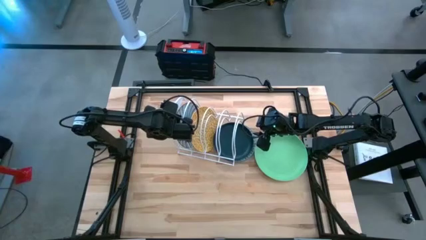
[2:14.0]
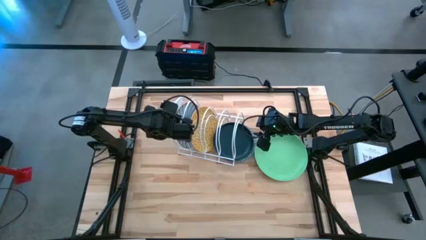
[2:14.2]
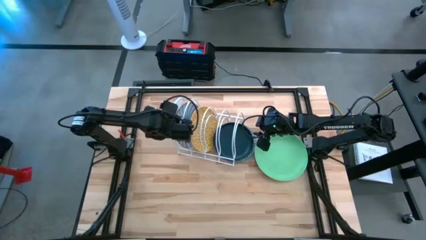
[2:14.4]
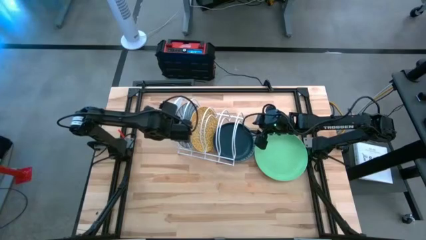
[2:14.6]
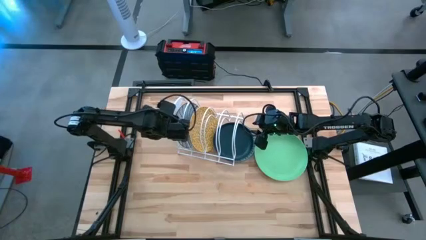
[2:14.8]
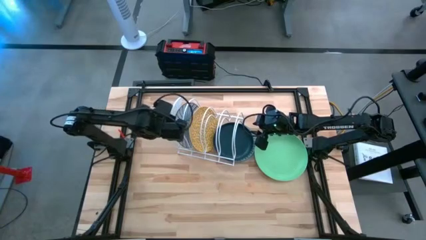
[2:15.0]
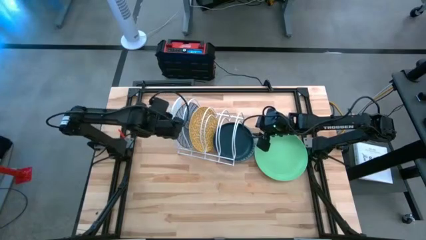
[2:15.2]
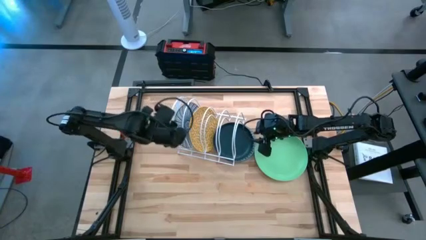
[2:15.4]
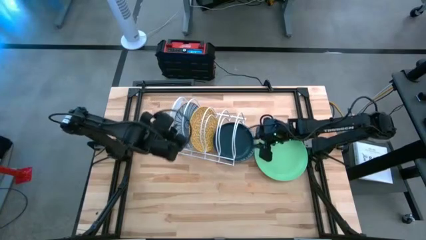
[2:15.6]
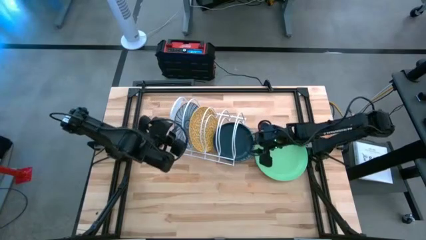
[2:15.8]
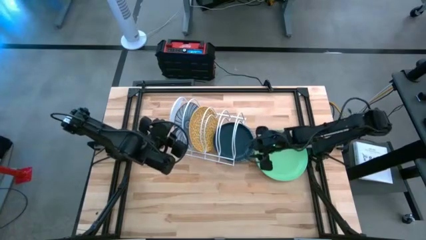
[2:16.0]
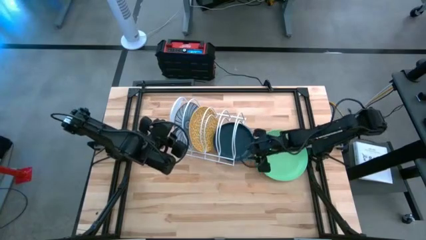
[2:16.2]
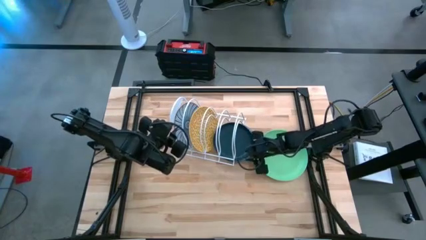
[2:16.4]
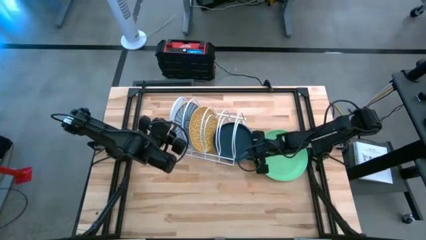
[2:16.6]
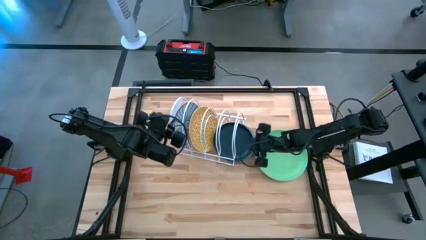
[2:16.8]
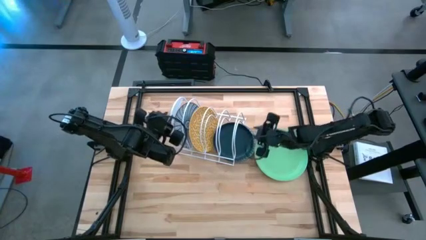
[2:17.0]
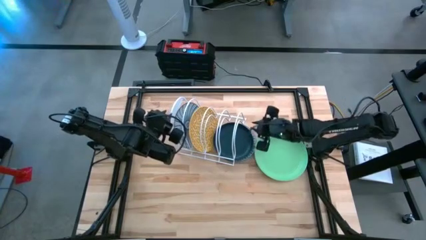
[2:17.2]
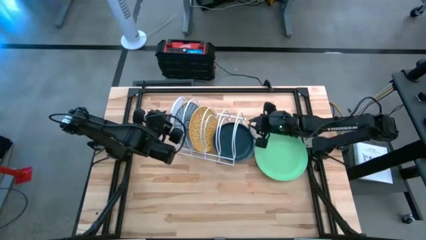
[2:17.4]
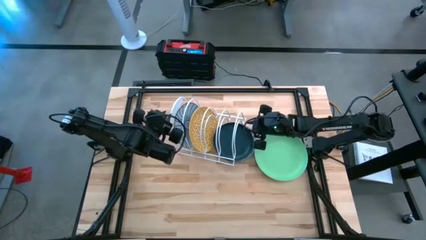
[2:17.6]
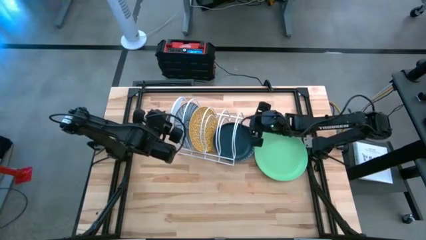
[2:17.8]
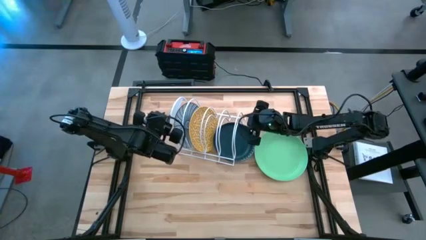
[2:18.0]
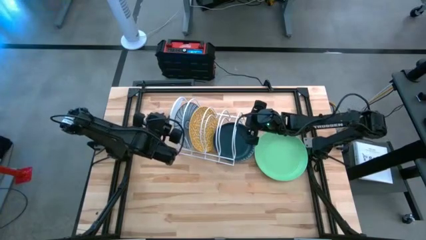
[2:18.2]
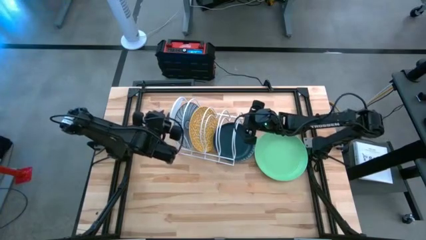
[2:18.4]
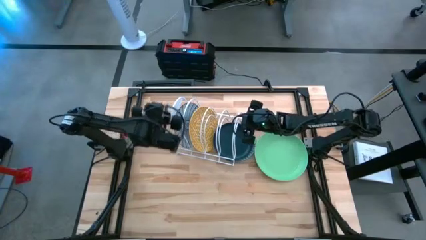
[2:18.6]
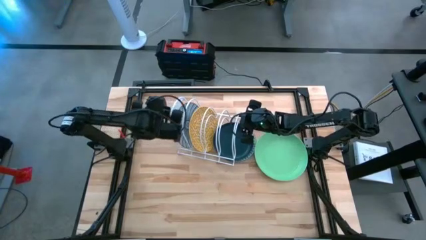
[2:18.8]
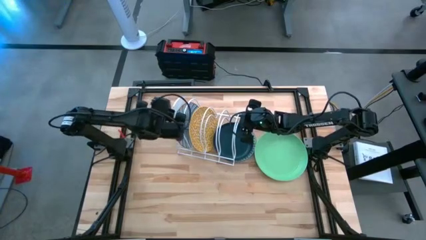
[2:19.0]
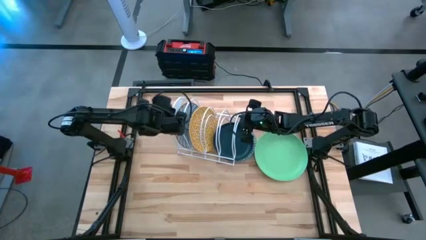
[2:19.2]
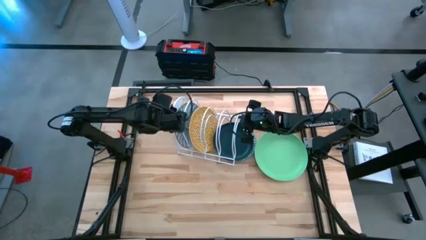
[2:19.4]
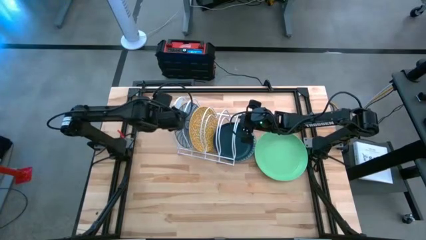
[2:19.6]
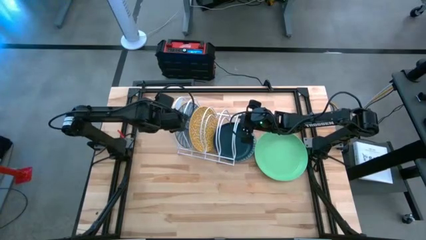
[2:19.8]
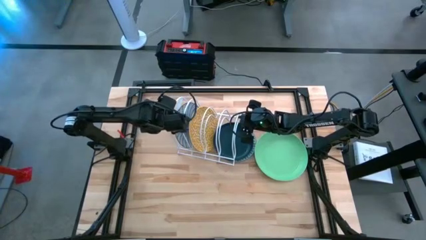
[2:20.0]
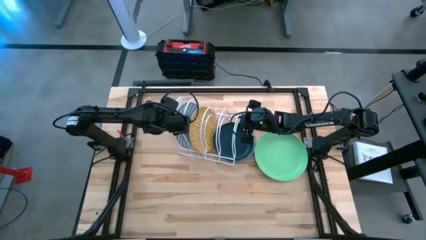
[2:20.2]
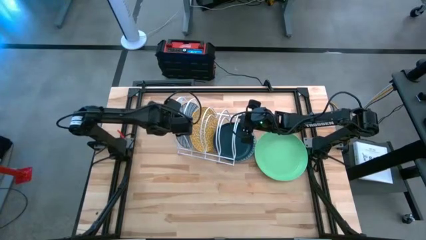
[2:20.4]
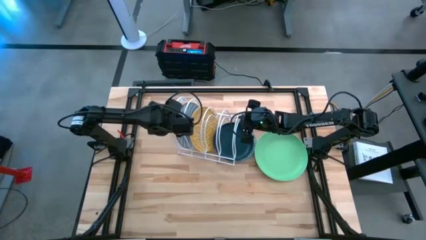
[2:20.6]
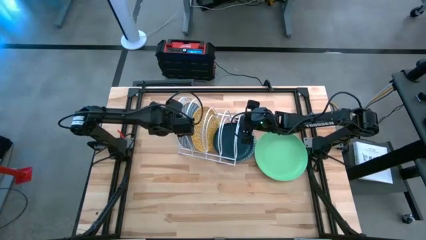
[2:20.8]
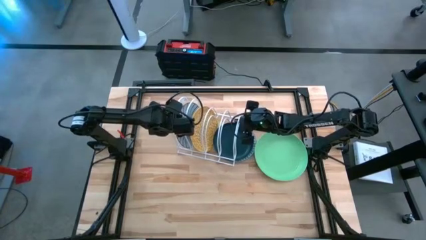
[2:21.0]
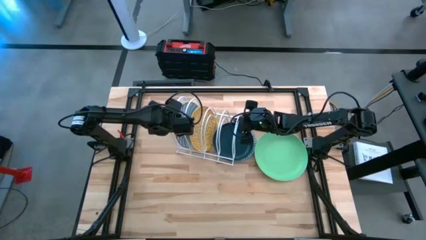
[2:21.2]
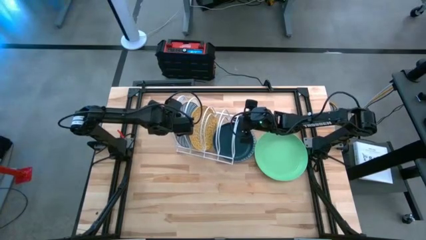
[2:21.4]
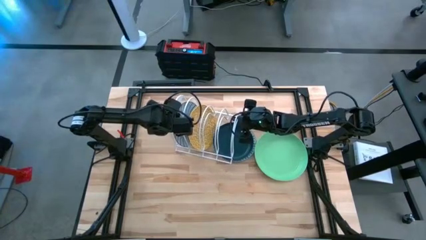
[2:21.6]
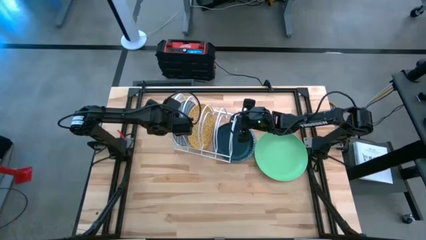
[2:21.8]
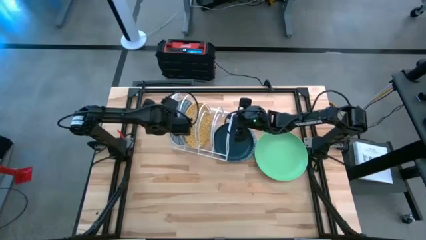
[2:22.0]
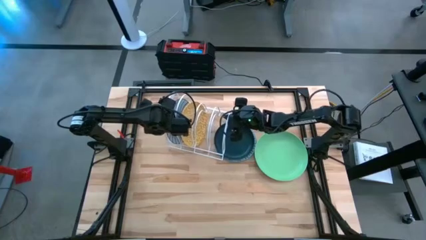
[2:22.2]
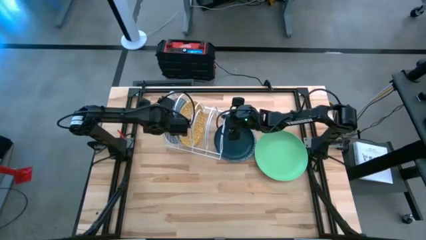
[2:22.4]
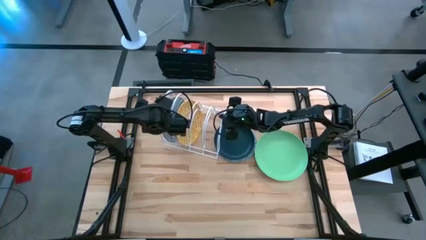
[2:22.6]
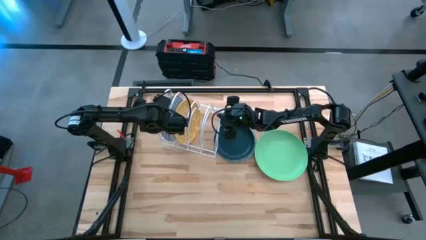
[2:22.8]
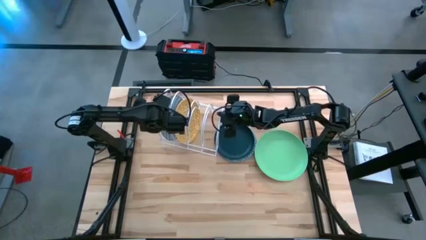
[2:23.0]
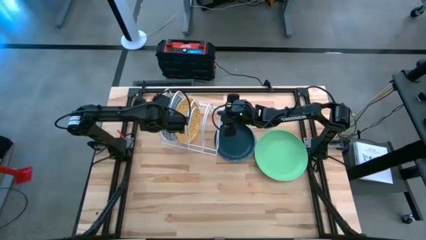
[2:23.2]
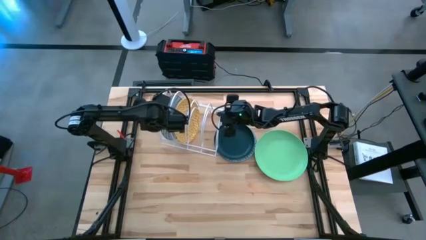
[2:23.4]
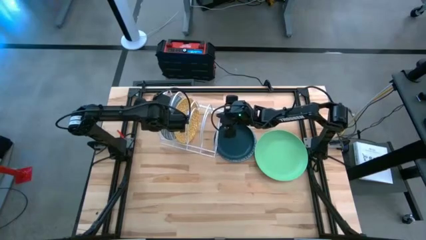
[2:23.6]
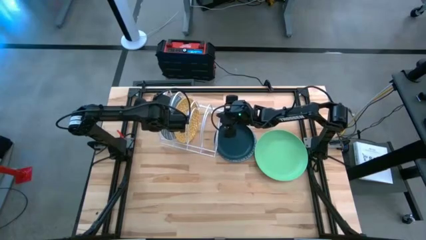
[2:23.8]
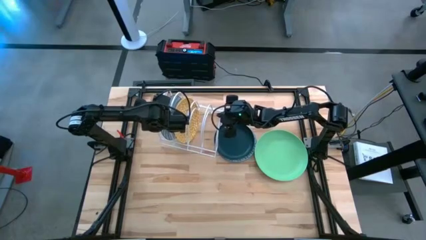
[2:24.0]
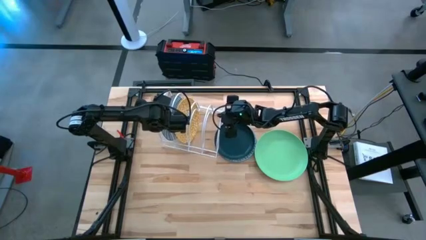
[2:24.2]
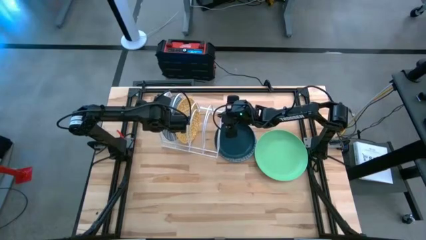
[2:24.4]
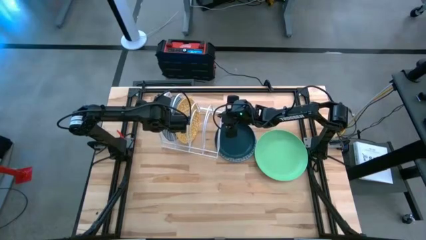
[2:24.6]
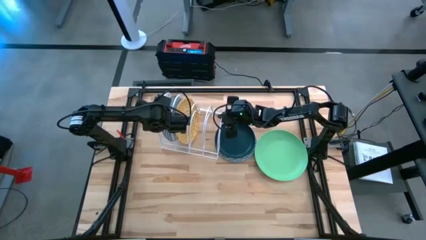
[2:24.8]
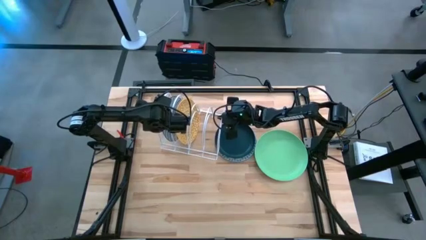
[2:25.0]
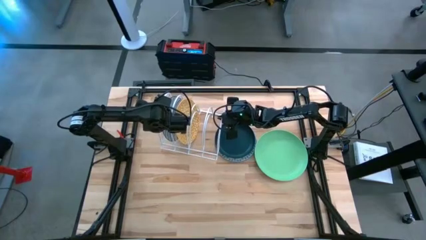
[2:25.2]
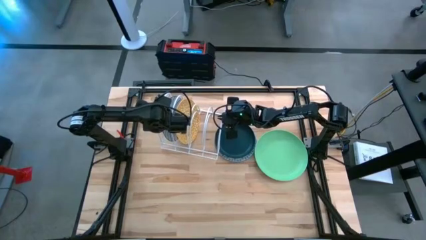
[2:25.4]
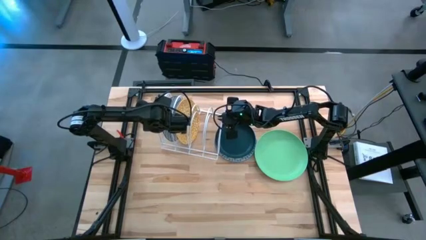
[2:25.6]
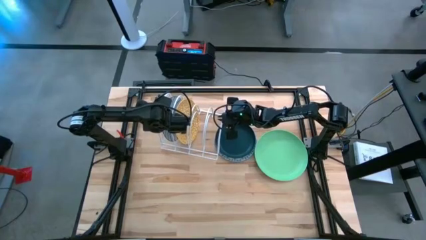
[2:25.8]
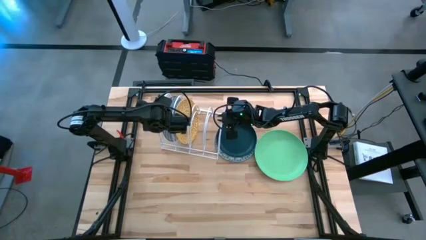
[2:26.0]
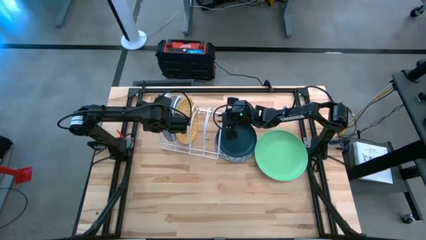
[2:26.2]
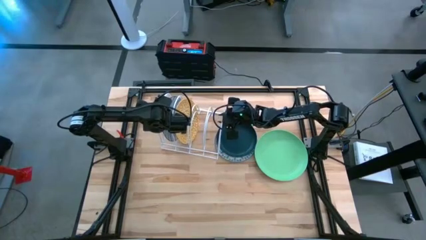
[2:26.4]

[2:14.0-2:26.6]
Task: Sort dishes
Adjust the dish rack
